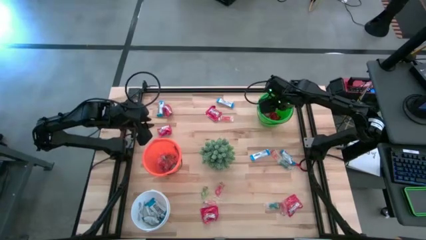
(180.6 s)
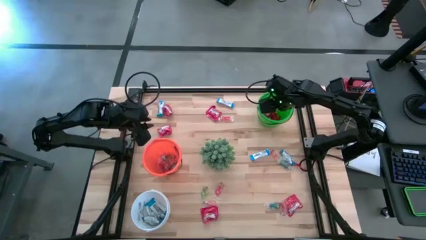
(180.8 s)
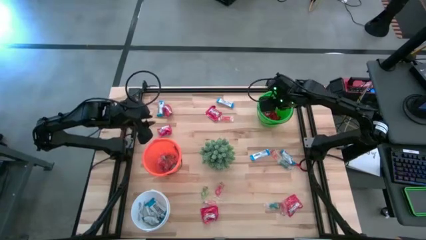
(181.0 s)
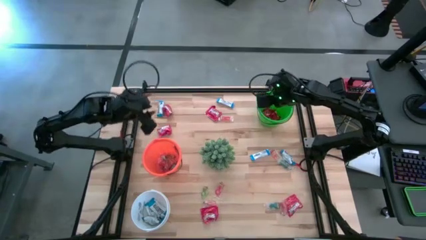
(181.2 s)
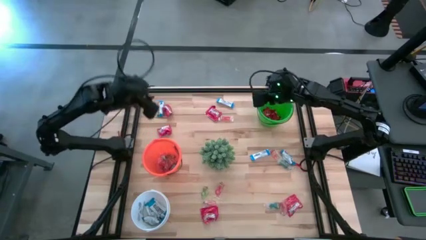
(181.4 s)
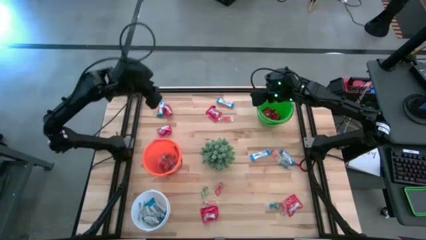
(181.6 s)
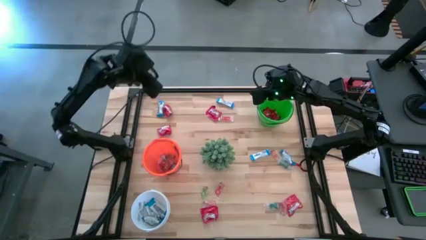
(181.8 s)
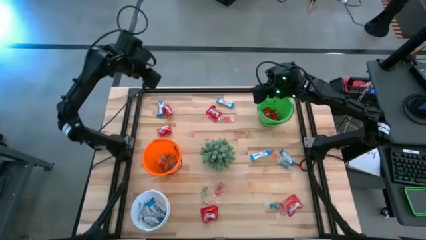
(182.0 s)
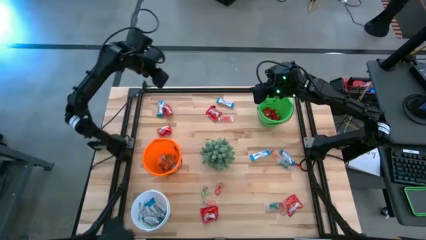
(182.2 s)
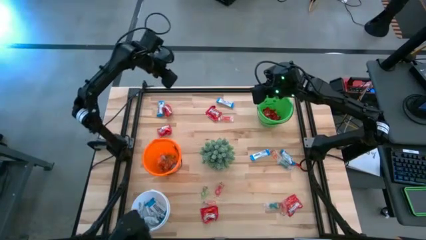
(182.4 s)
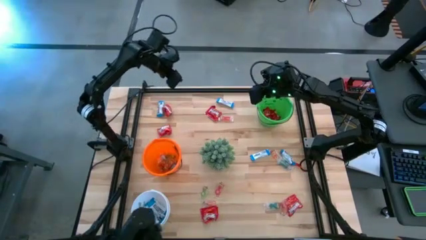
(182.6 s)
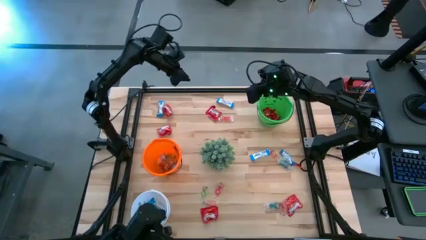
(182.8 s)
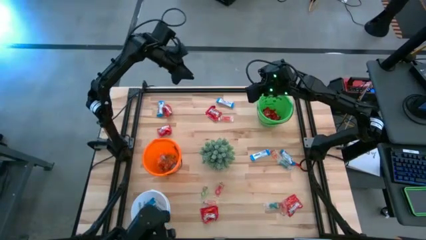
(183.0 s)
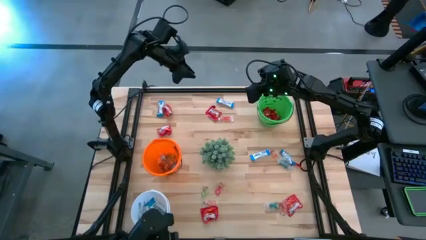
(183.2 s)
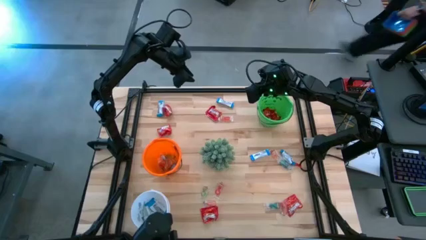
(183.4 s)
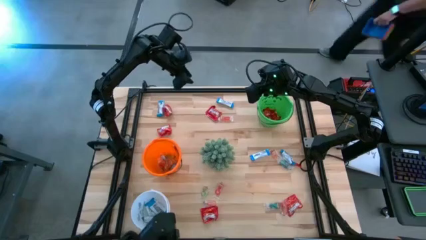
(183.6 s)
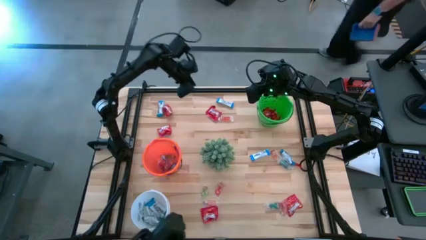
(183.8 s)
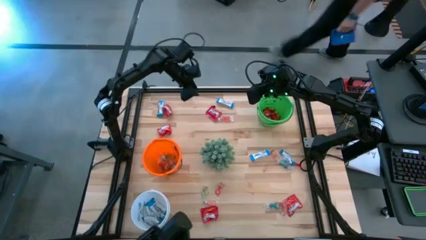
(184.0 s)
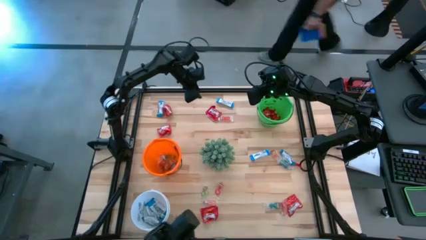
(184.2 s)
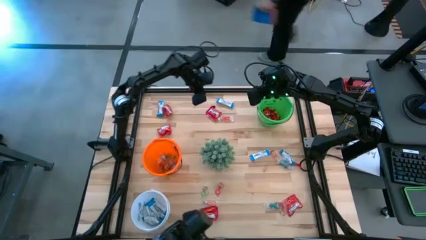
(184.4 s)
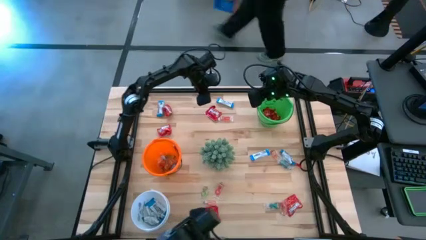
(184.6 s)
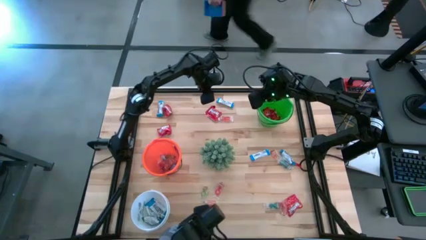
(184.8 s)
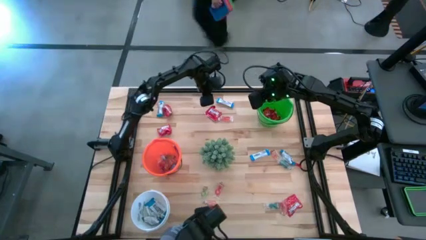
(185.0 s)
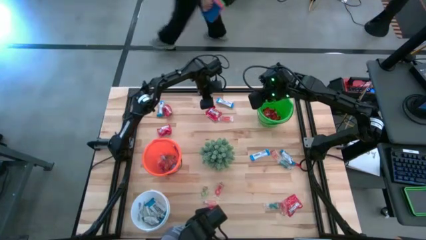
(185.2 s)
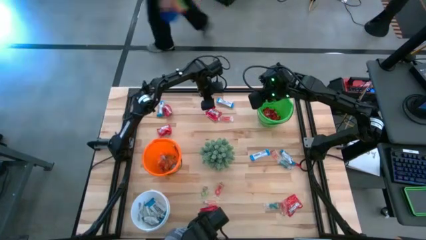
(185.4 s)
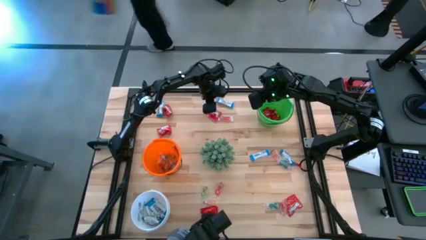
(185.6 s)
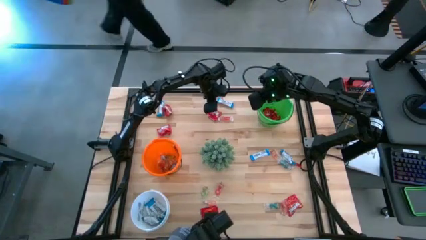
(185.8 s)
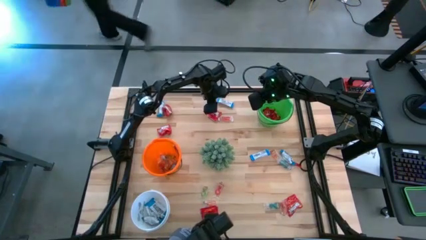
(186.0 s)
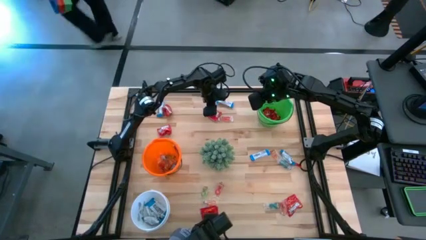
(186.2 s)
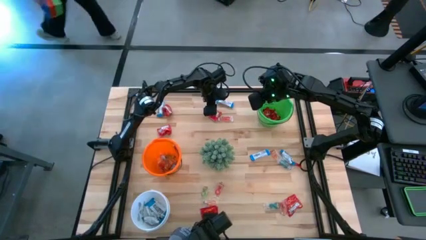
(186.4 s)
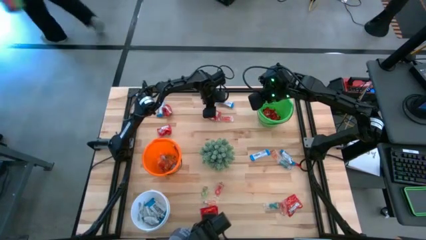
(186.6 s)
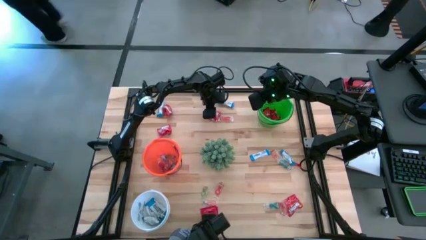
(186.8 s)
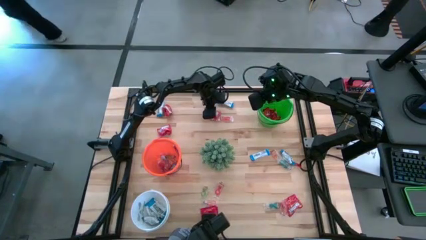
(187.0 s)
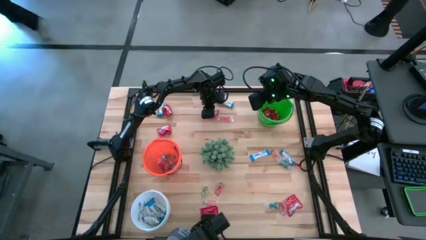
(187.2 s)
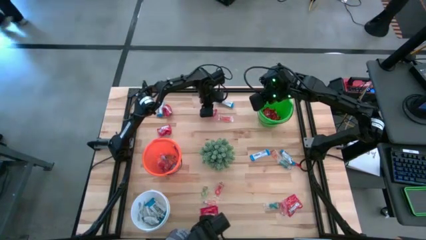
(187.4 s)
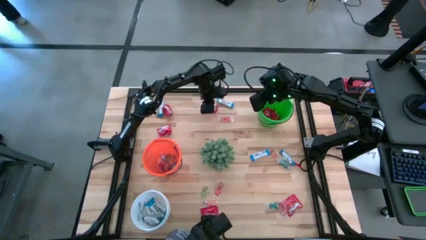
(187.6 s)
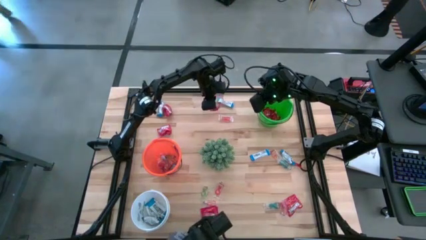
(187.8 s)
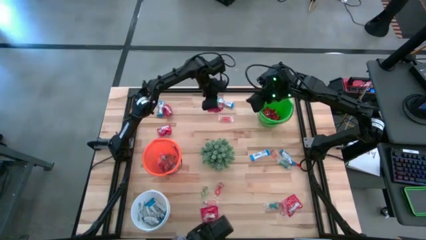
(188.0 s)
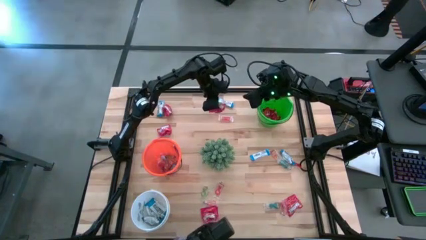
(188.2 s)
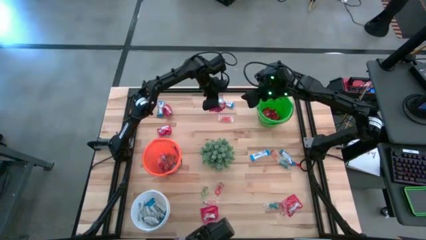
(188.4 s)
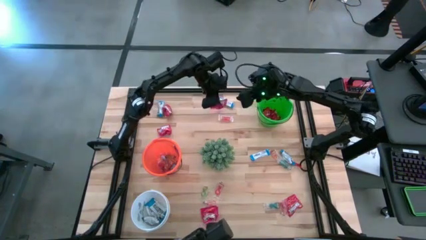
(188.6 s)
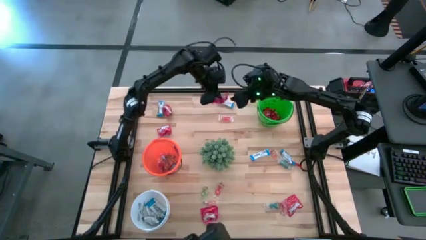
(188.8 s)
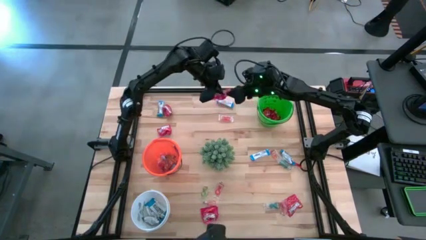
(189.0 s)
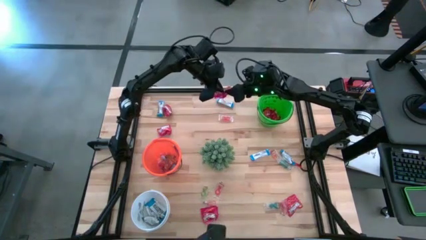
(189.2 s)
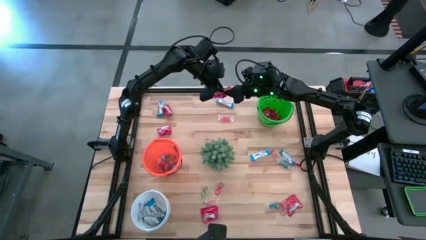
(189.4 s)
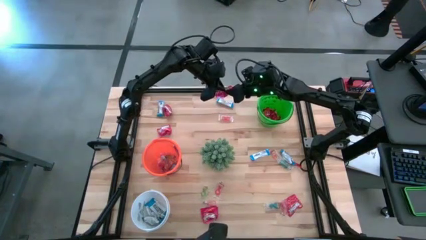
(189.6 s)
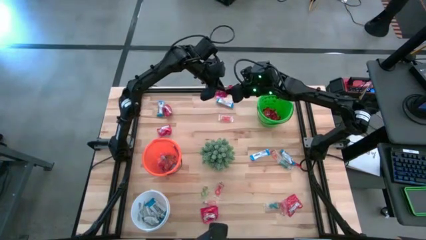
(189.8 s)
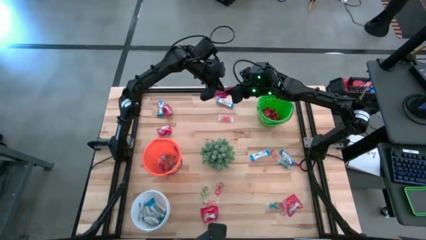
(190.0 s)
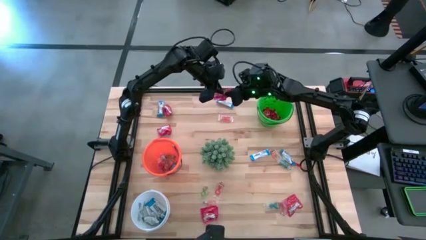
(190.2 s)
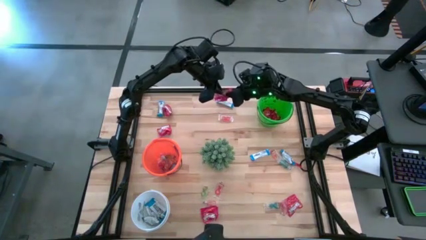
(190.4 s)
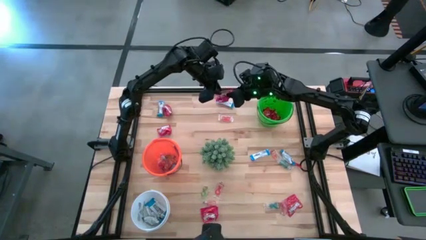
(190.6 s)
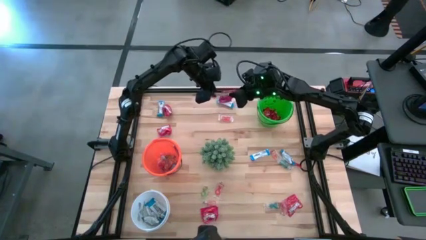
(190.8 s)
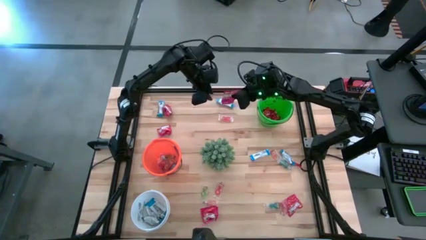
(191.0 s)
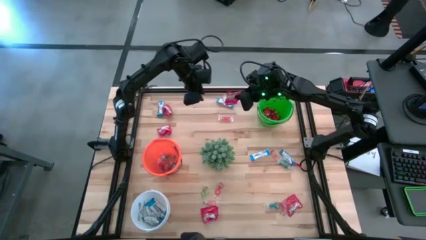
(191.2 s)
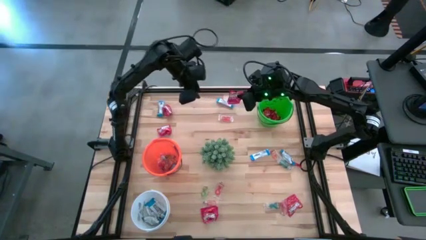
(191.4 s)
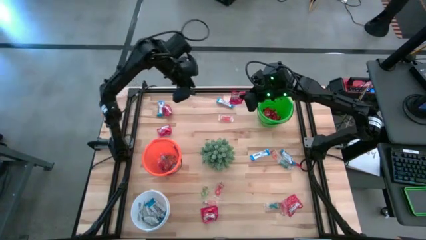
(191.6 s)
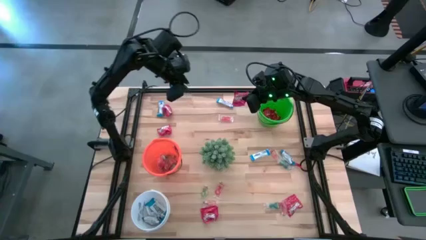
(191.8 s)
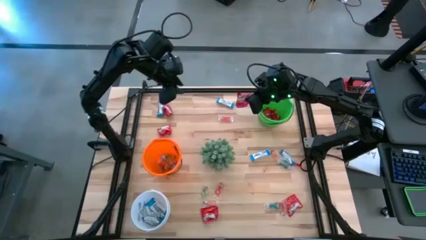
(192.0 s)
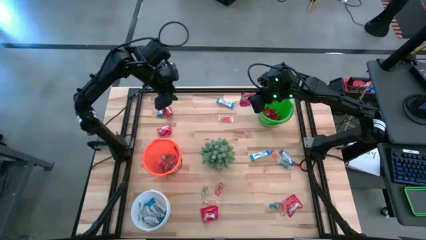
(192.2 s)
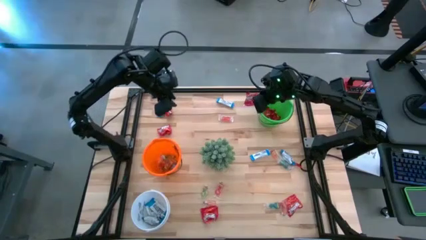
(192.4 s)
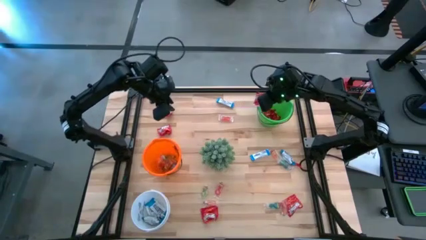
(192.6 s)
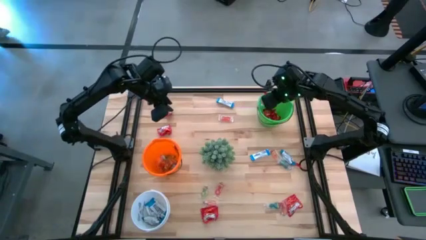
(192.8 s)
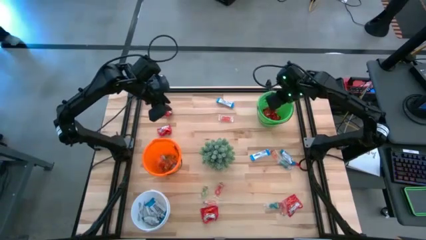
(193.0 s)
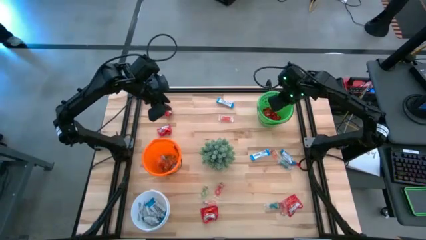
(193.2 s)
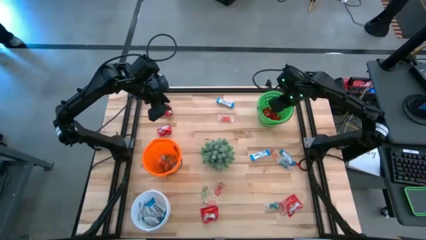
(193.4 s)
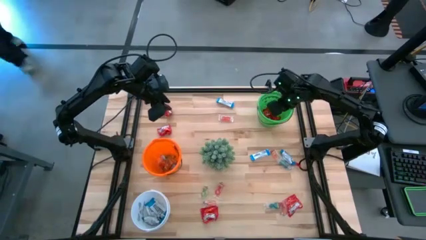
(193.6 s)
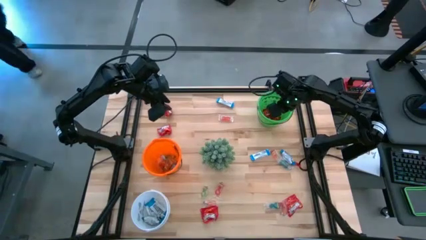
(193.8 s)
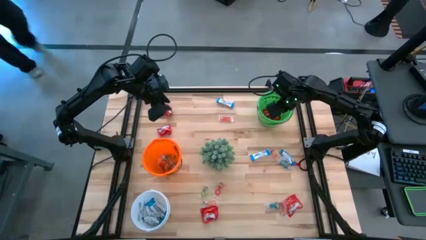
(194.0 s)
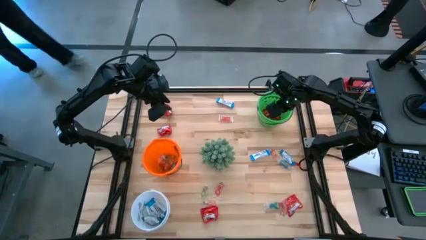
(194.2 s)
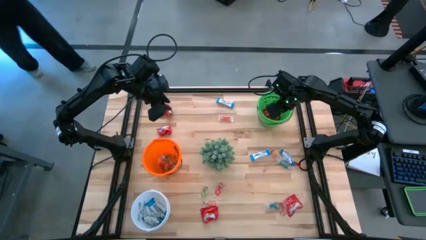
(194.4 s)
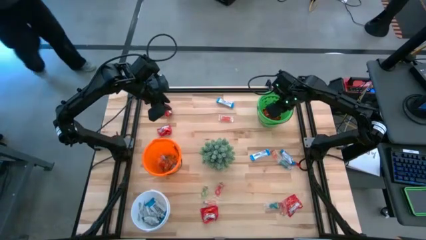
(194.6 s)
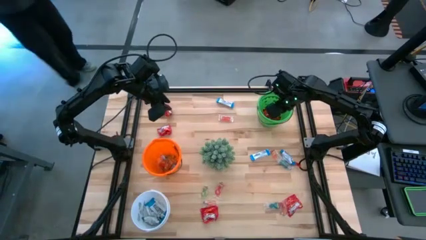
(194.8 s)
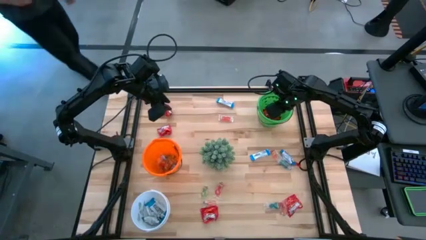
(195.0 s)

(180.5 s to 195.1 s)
Task: Sort candy
Put the red candy into the green bucket
